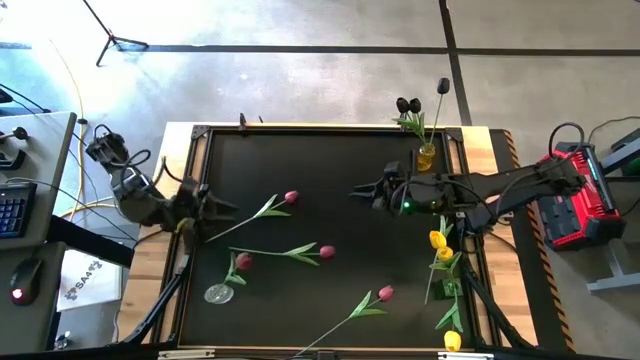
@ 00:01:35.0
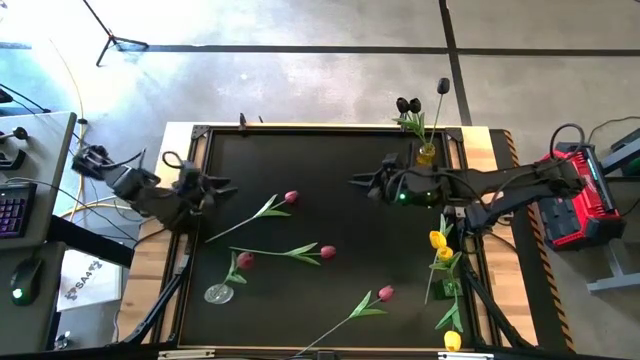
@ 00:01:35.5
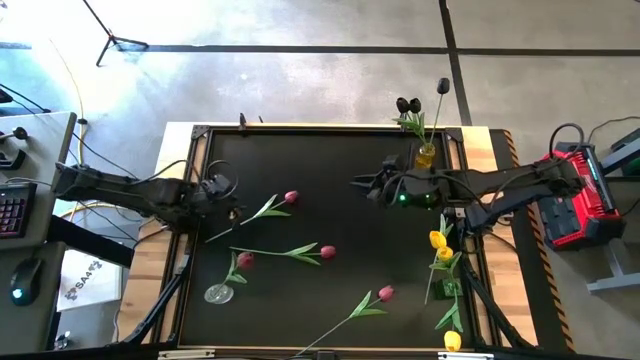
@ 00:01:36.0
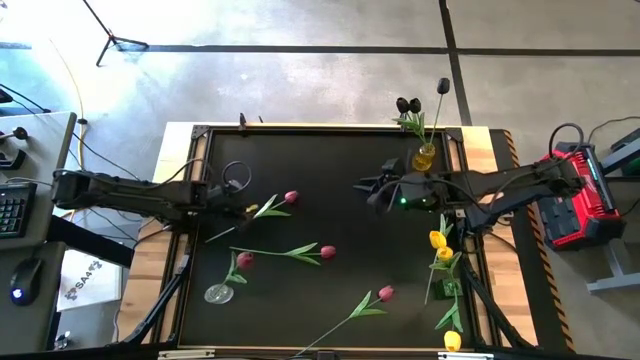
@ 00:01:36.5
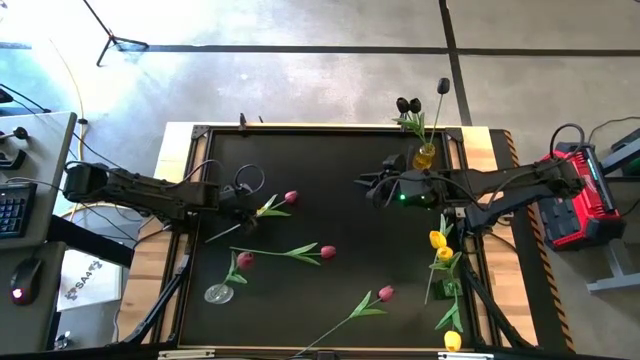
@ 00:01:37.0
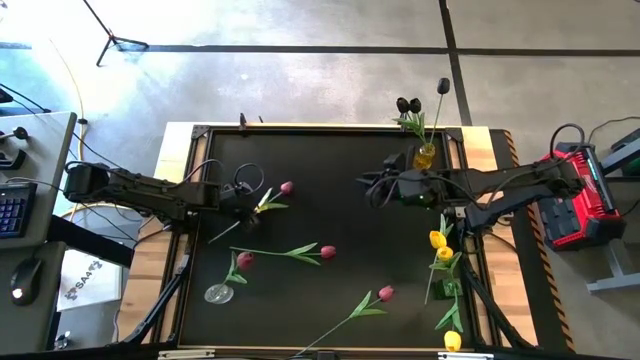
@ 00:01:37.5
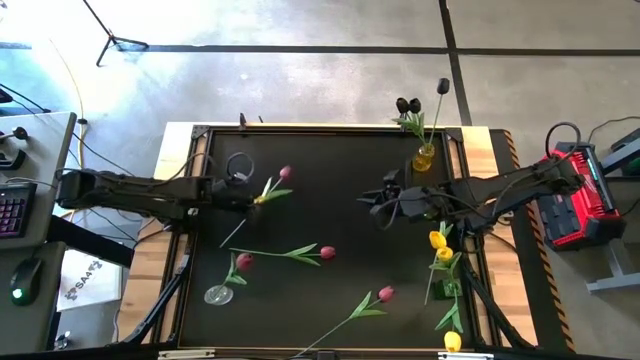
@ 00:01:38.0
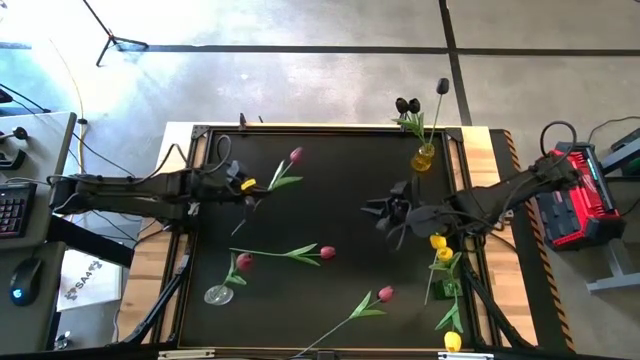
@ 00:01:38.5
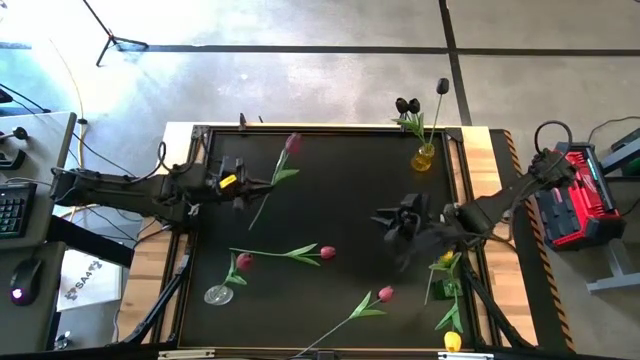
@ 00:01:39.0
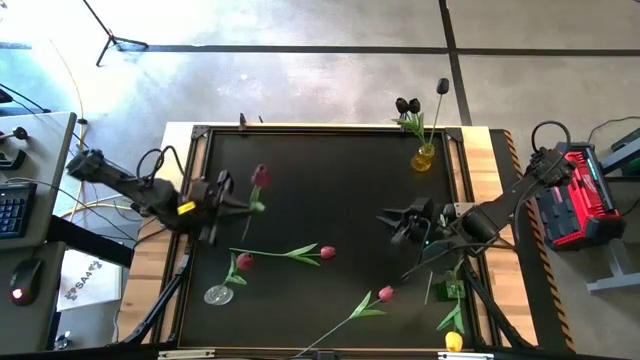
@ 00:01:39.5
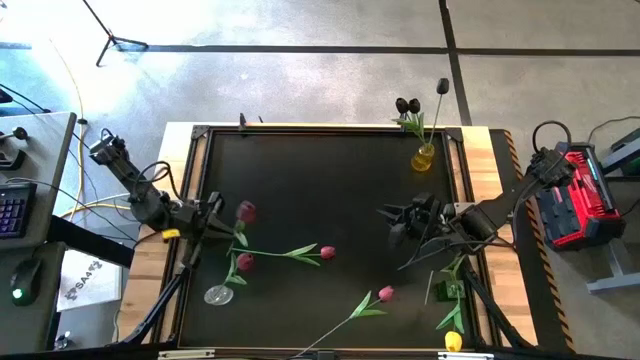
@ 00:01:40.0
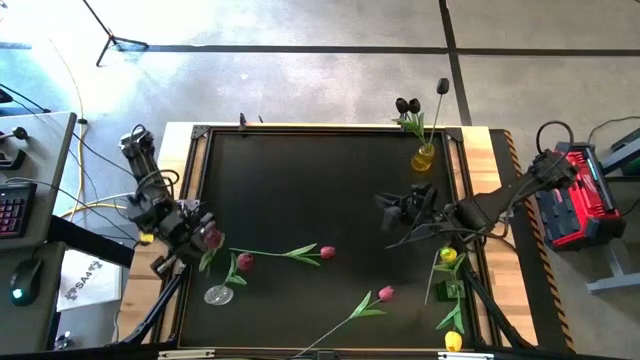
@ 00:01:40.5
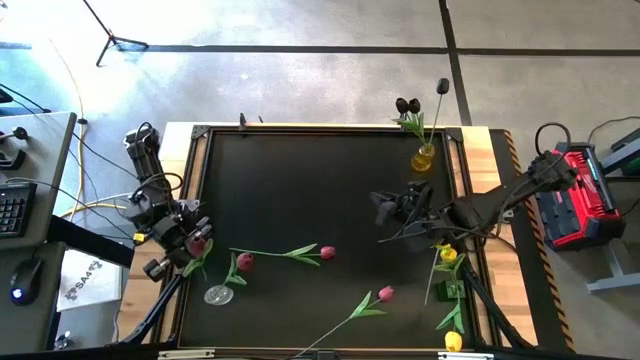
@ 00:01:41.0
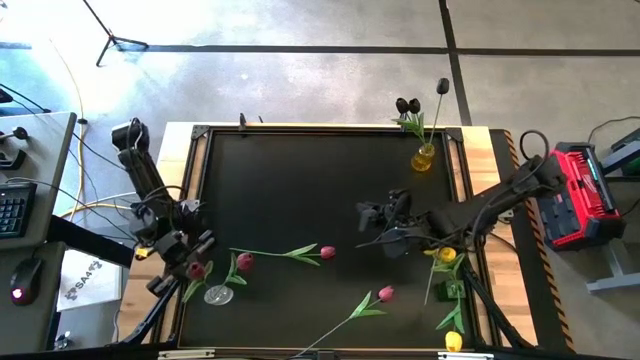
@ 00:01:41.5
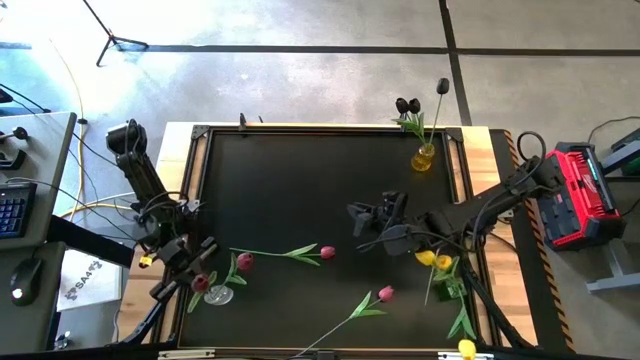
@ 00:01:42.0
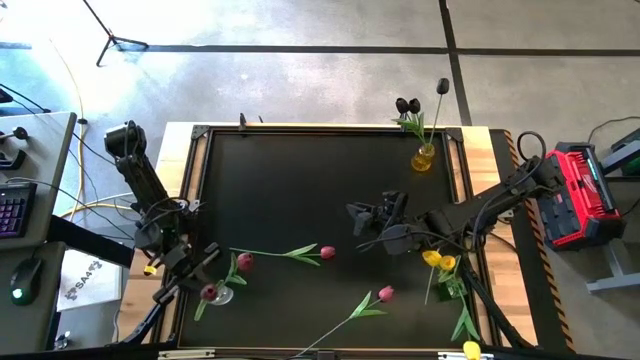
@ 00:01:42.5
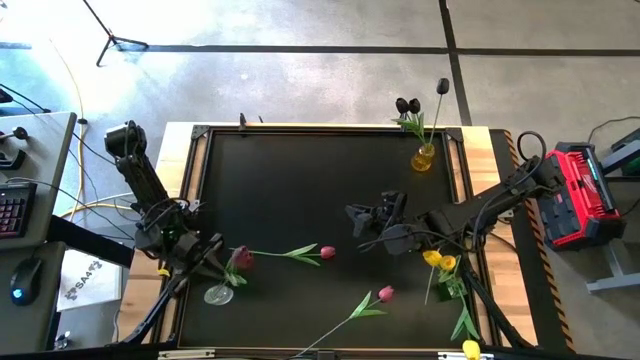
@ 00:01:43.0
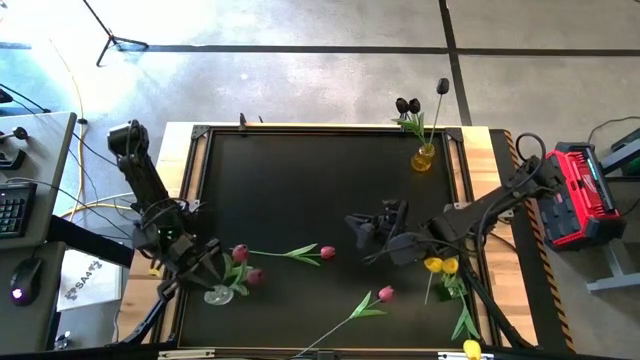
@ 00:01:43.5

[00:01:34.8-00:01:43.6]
Task: Sort flowers into vase by color
Put the left red flower into the transparent vase

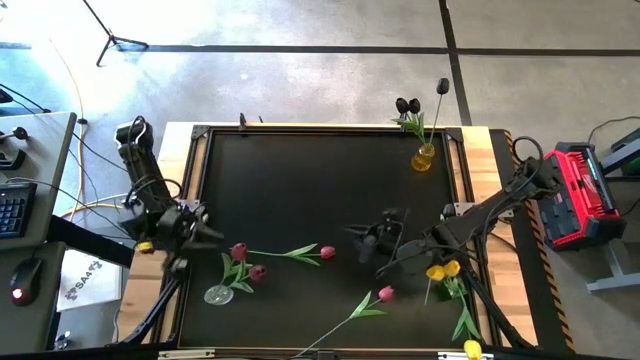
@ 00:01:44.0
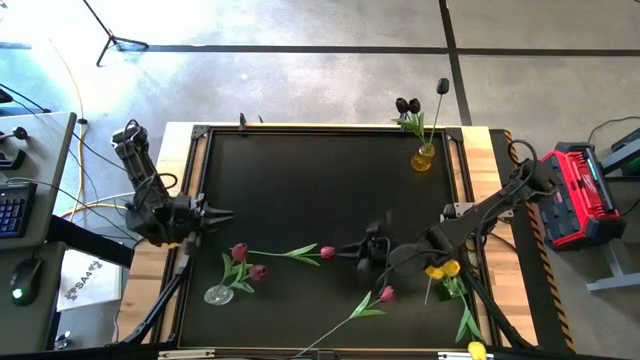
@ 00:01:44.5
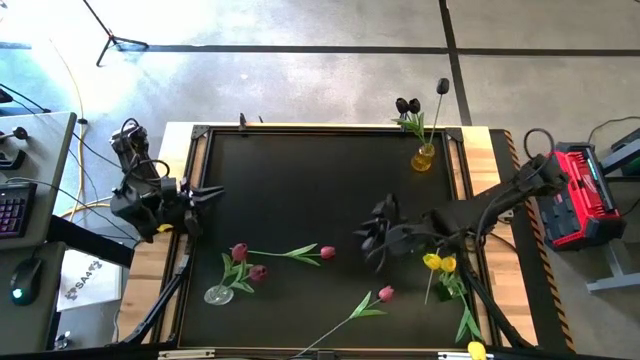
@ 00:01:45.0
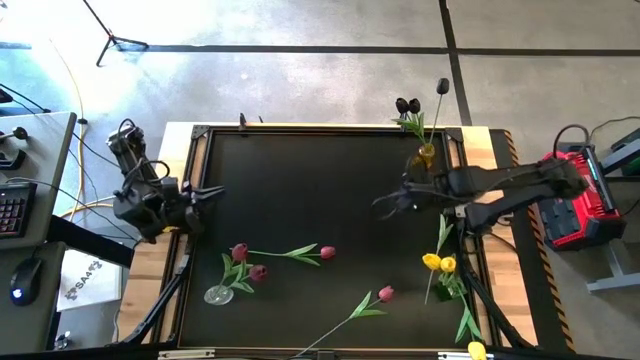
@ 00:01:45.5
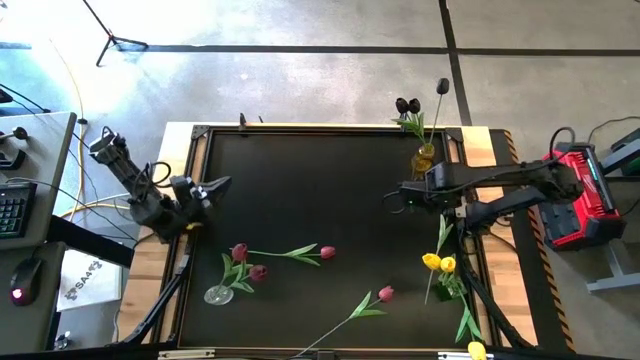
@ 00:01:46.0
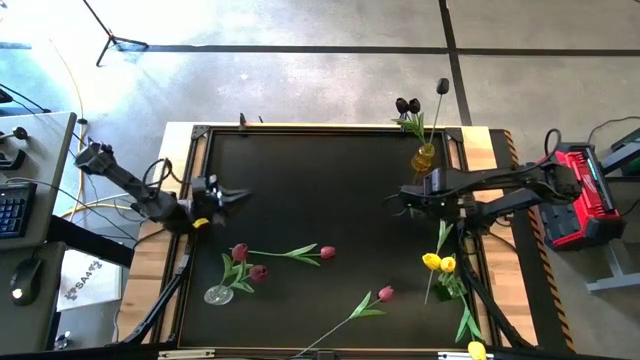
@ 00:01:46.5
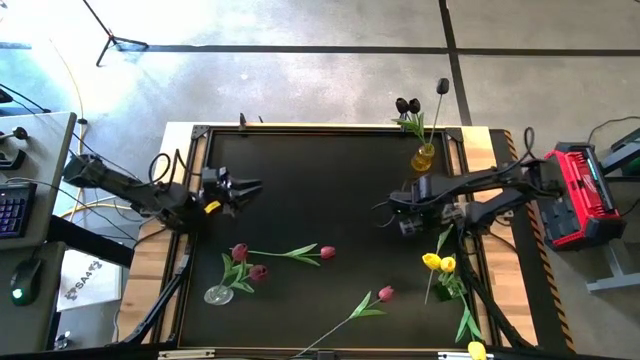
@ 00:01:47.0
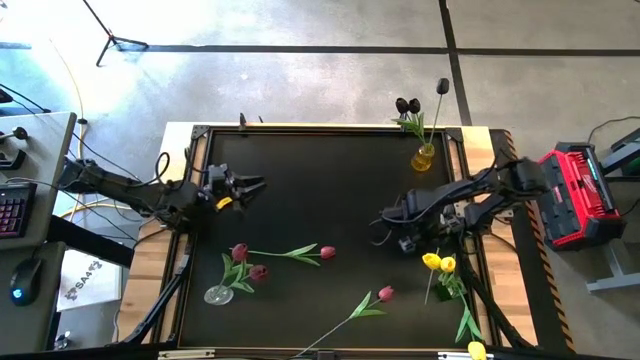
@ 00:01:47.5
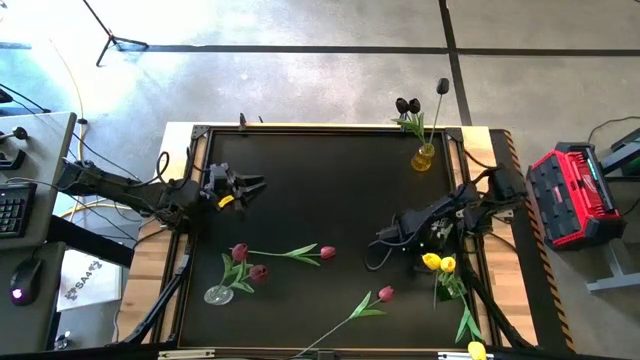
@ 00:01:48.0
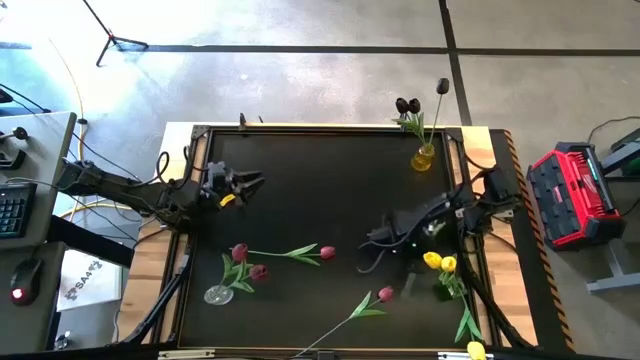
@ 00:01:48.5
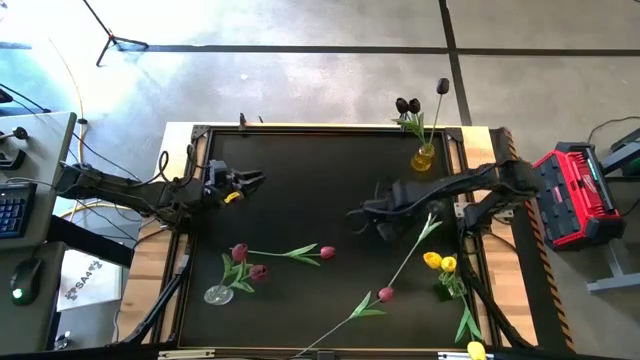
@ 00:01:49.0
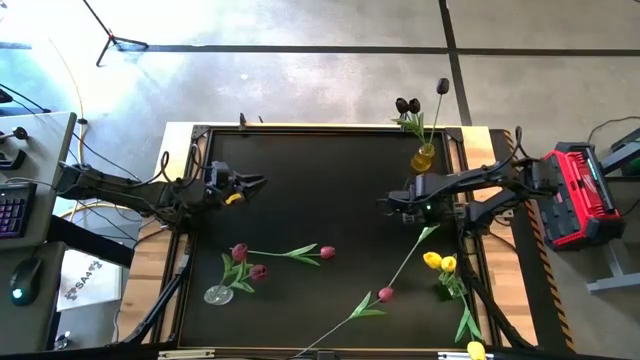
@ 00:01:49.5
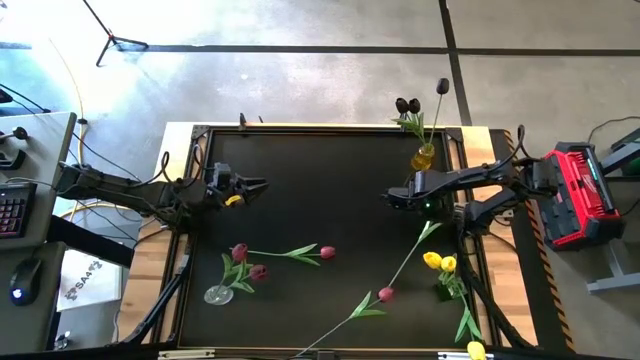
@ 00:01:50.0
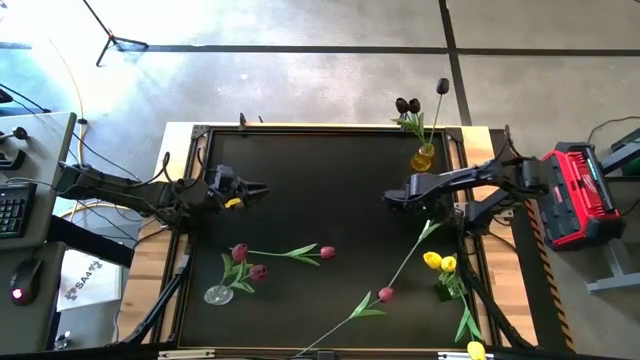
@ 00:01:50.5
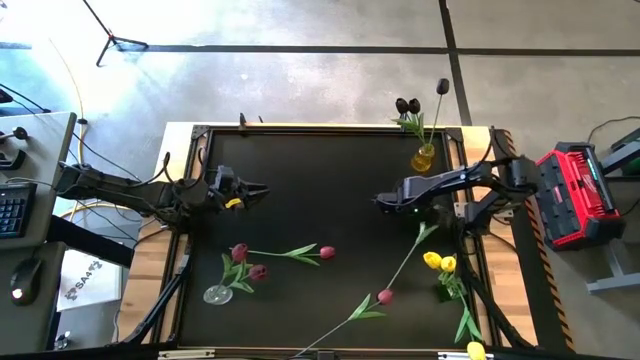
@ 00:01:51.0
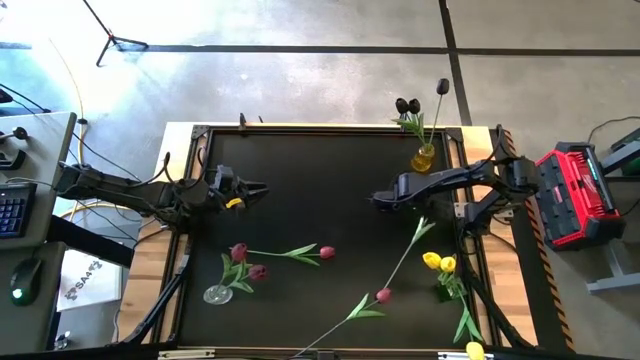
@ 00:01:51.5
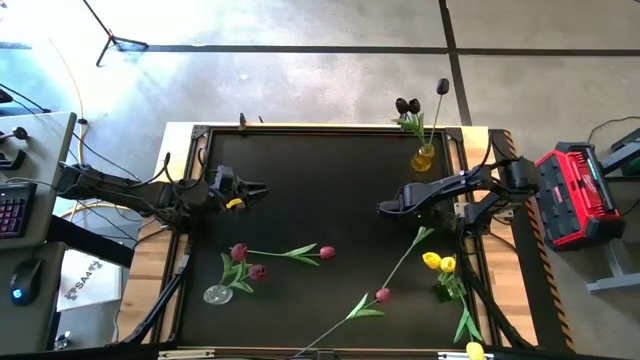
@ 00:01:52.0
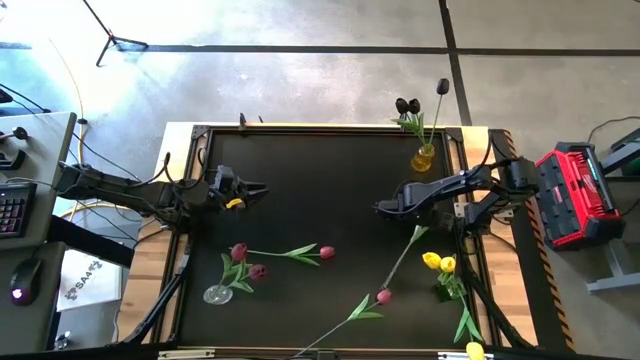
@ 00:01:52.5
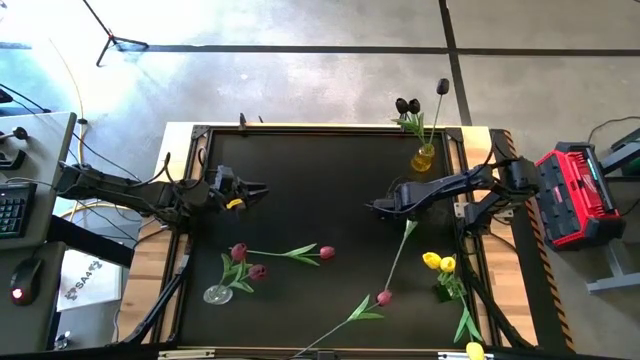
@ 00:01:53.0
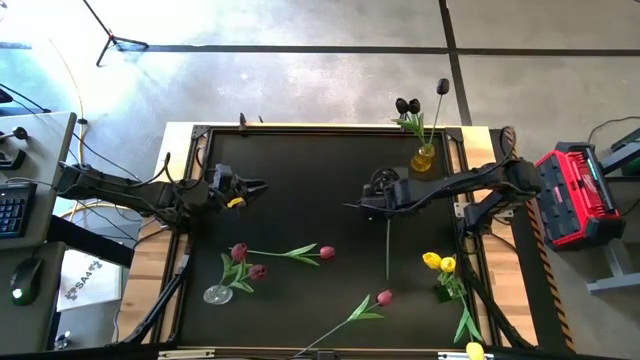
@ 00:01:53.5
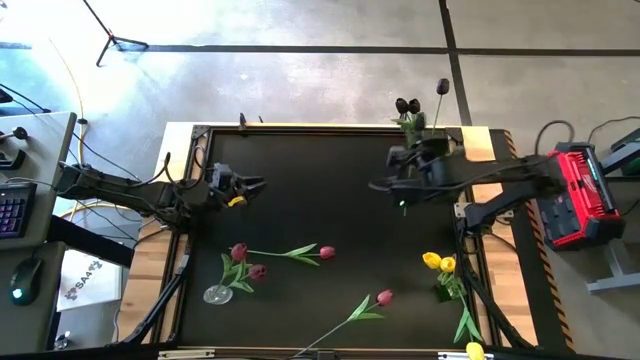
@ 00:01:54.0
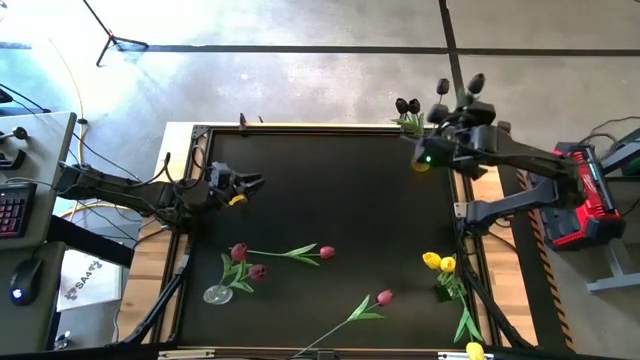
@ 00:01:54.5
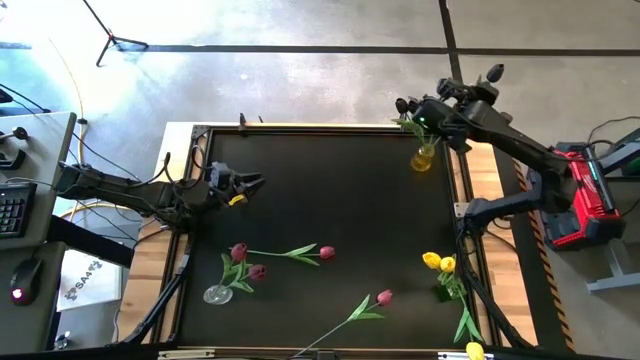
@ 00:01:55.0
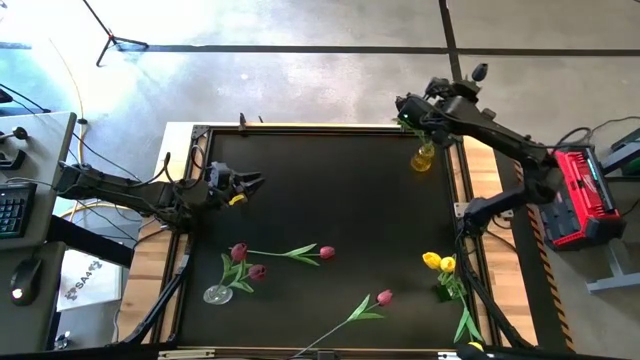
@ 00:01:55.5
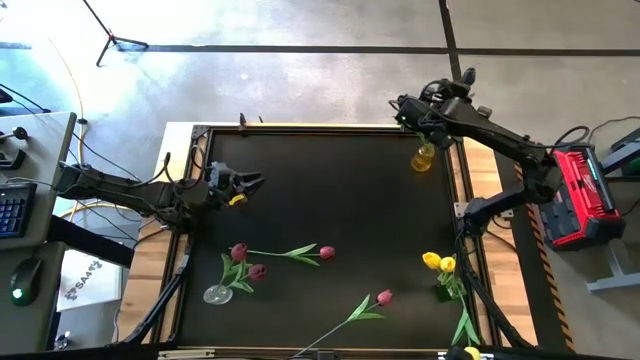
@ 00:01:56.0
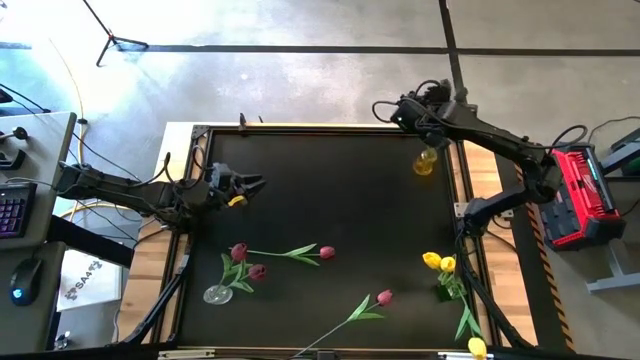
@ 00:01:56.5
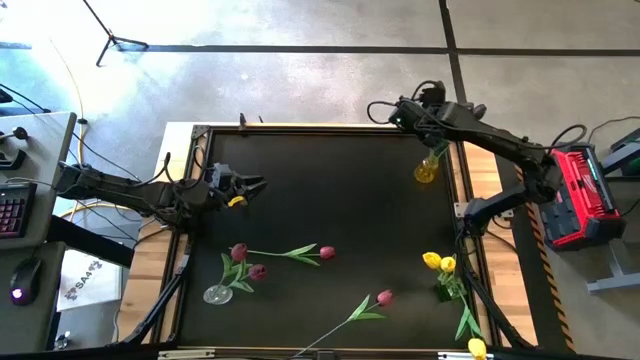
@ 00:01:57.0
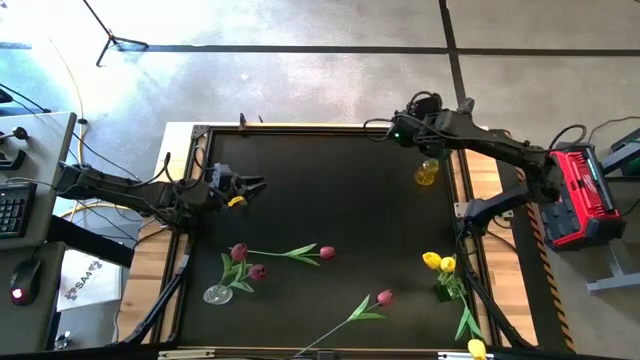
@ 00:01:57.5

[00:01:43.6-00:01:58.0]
Put the black flower into the yellow vase
